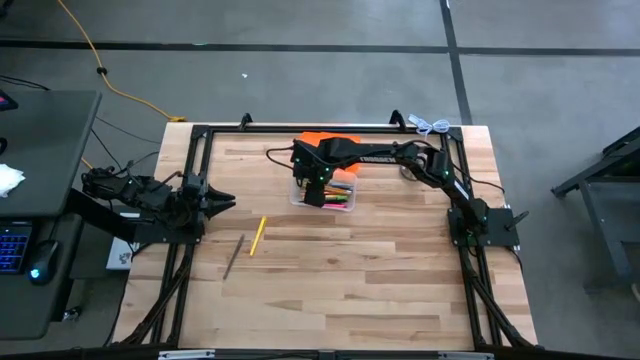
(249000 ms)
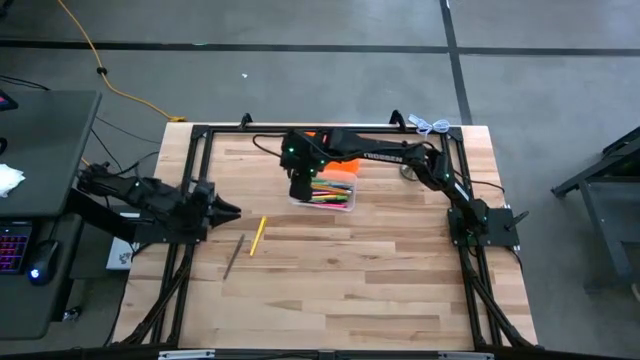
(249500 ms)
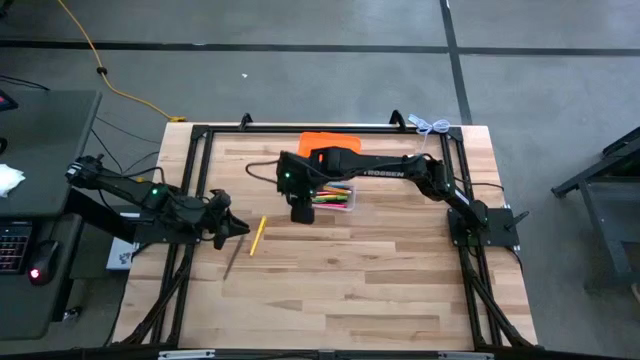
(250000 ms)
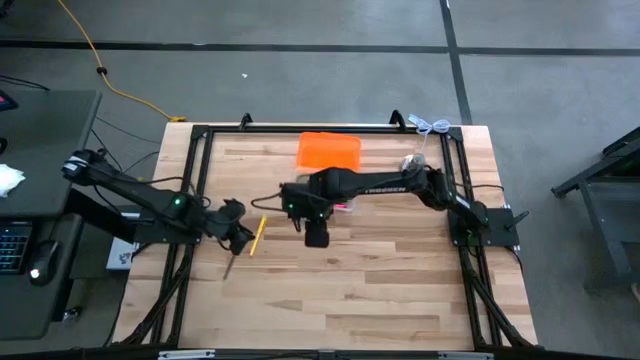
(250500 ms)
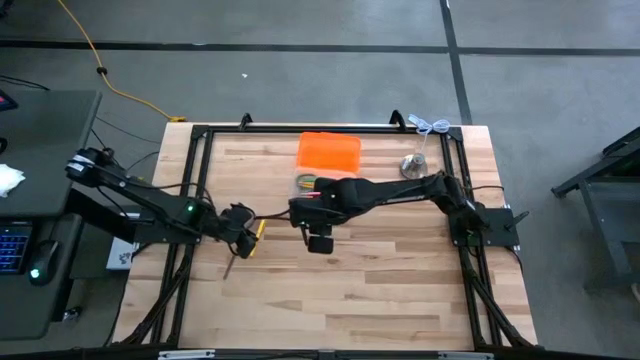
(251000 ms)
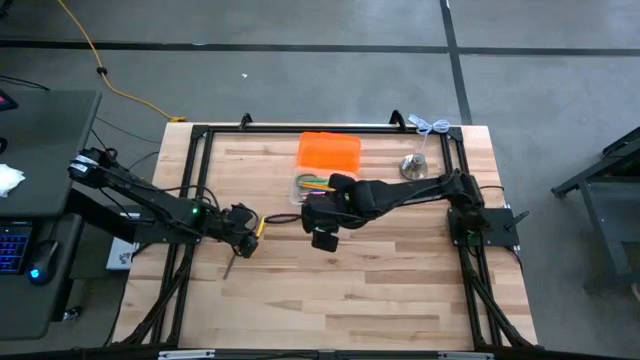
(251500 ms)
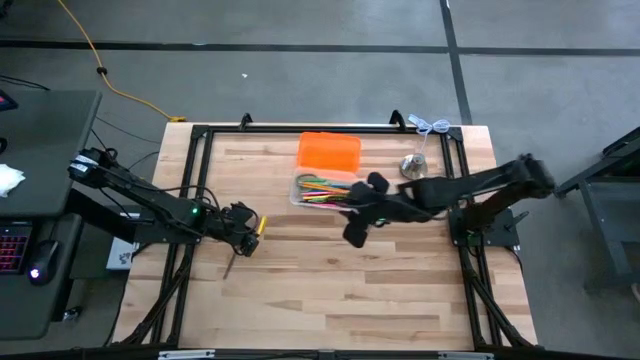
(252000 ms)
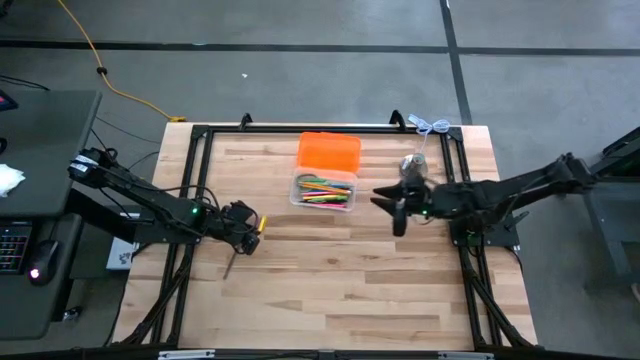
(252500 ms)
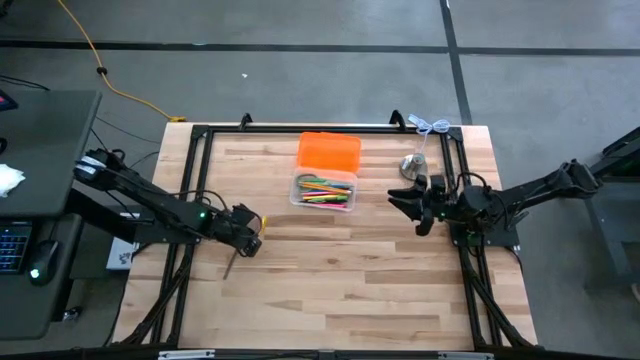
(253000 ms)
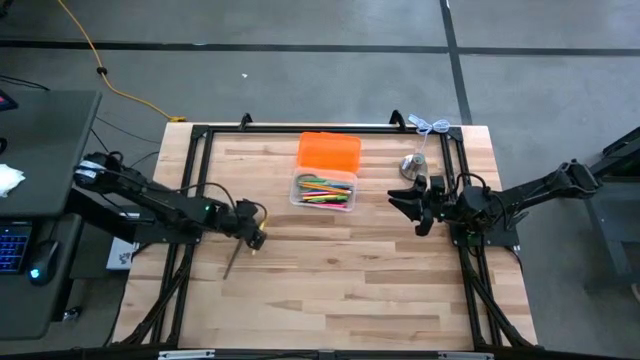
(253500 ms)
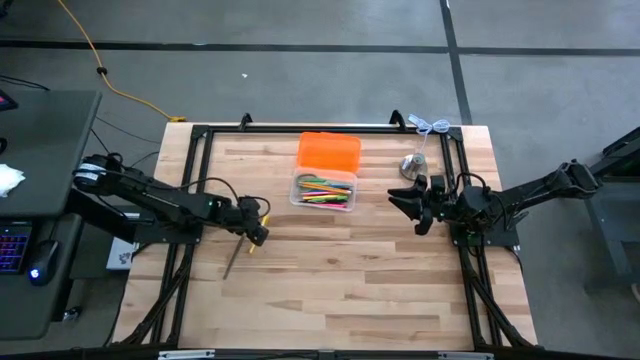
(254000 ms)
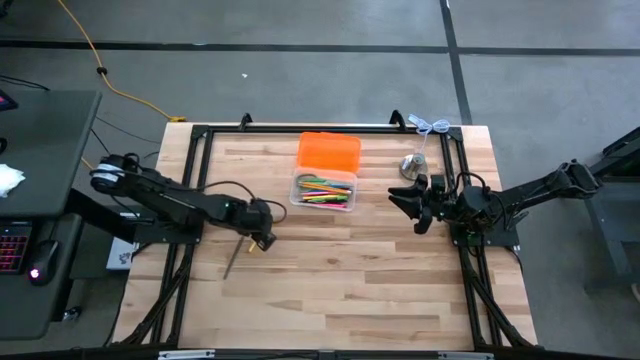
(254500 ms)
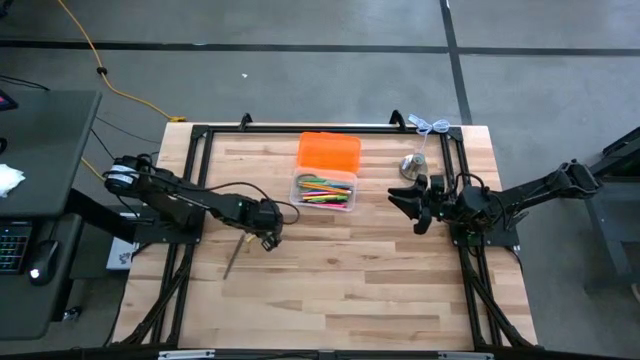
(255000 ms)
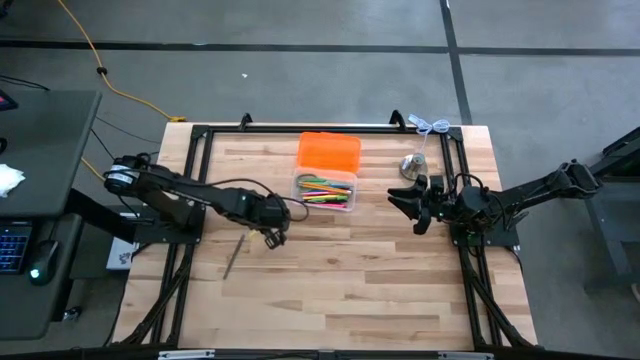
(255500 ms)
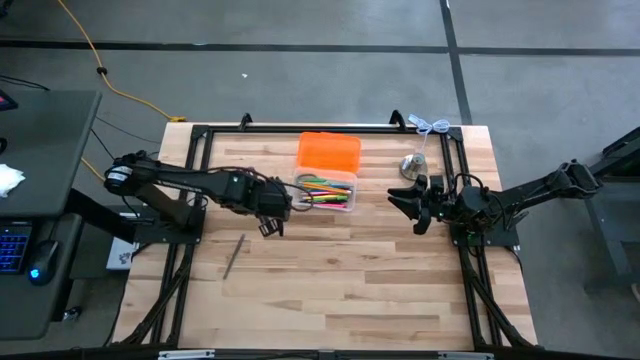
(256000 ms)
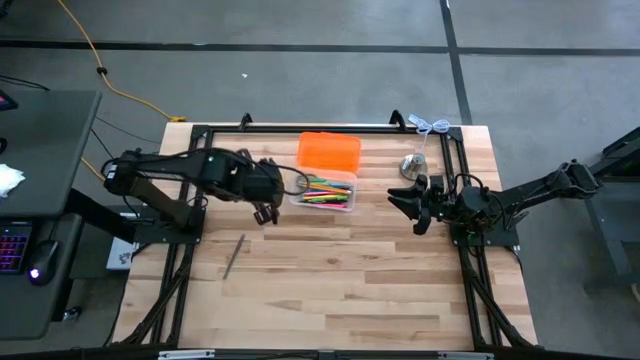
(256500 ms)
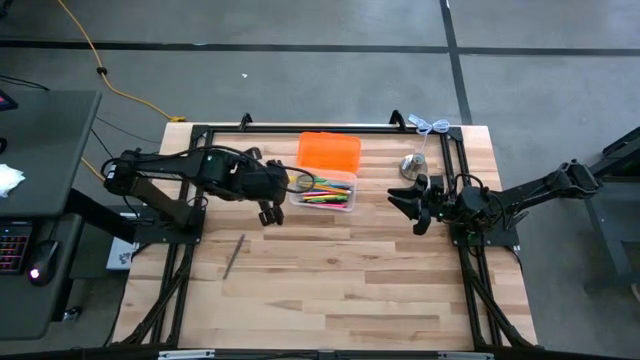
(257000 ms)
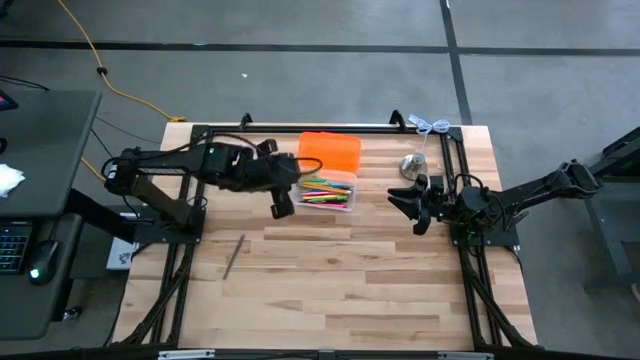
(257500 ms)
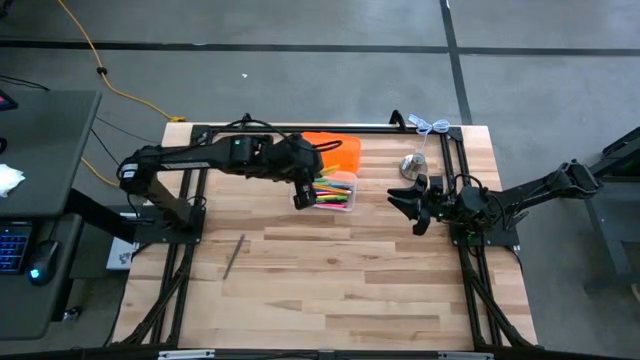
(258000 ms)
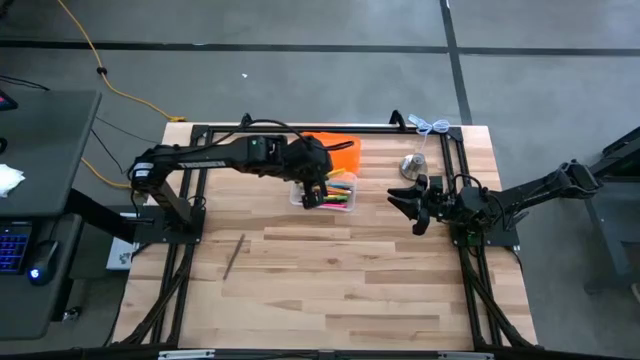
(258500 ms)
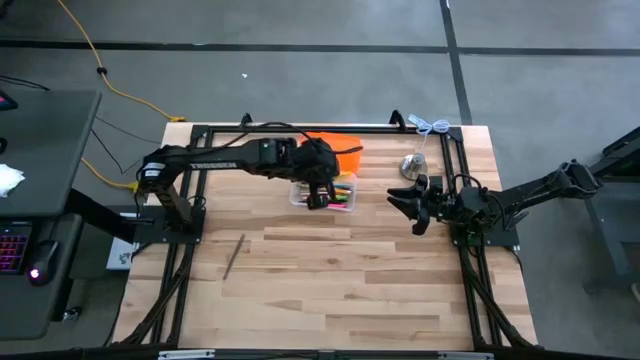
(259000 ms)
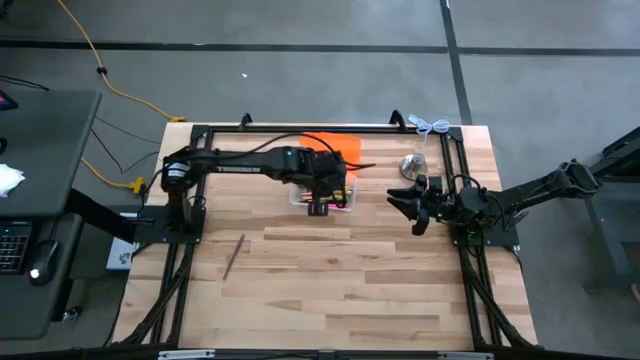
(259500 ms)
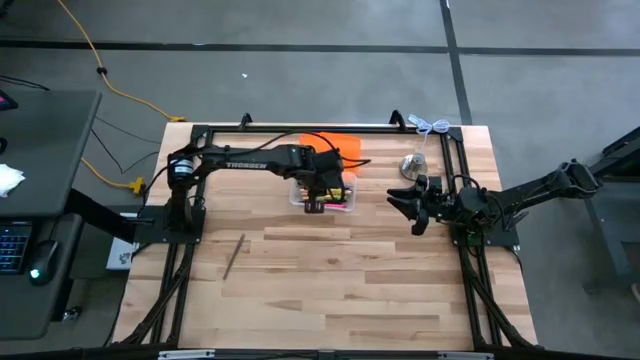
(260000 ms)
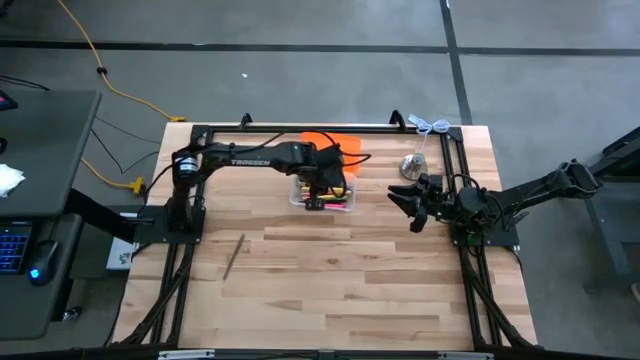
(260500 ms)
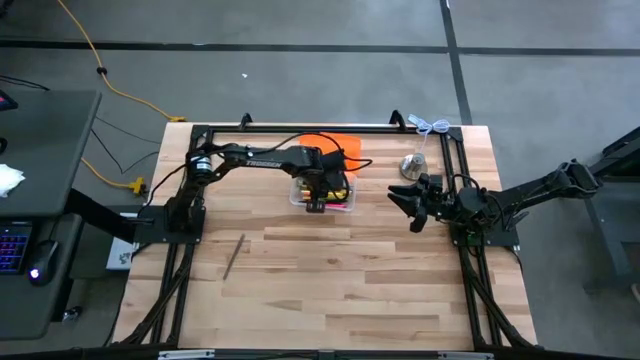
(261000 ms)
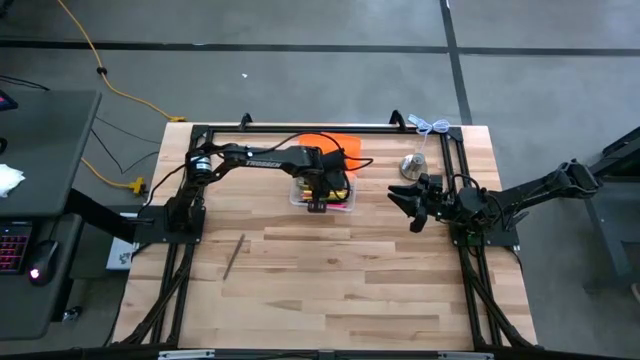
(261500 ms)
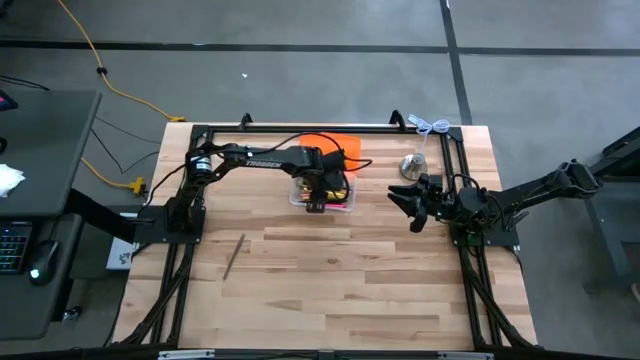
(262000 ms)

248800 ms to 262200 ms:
Task: Pick & place school supplies into a supply box
Put the yellow pen into the transparent supply box

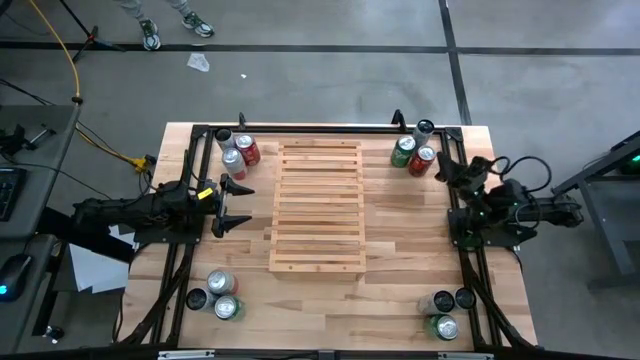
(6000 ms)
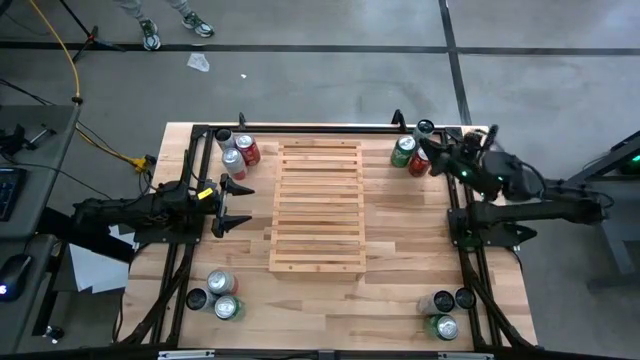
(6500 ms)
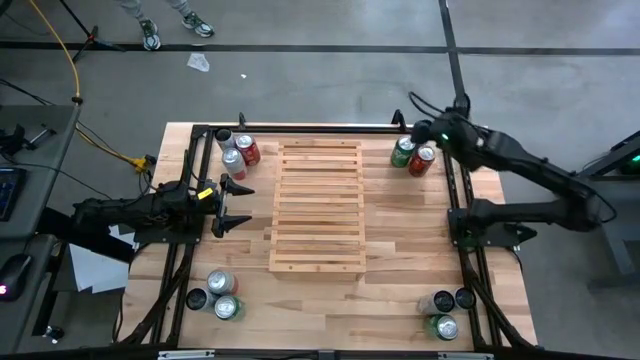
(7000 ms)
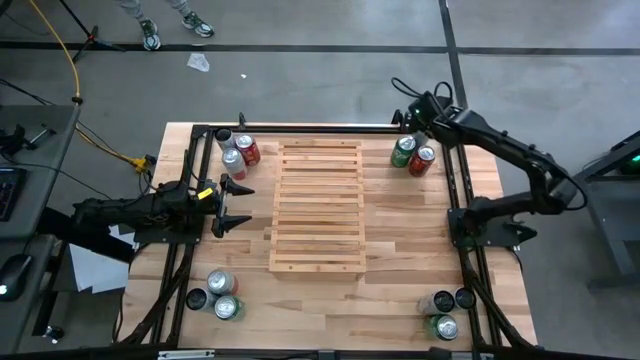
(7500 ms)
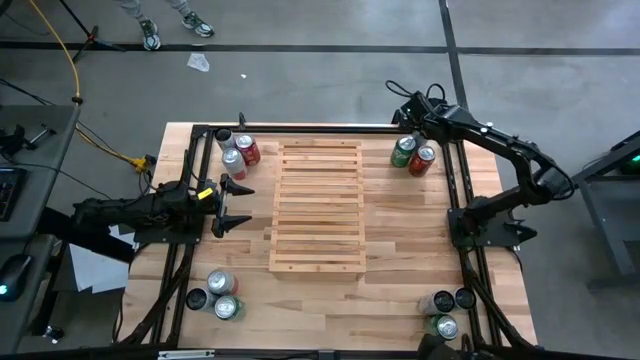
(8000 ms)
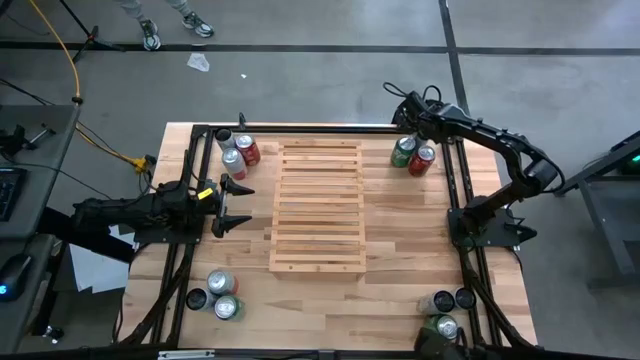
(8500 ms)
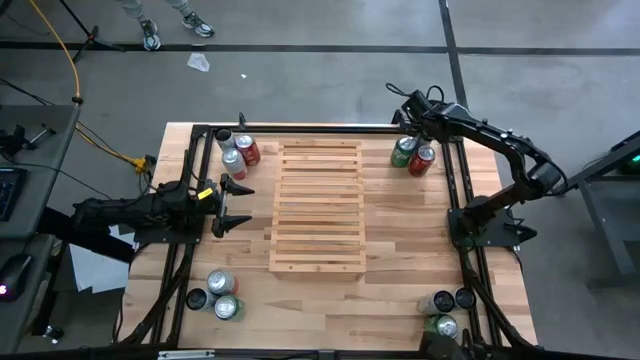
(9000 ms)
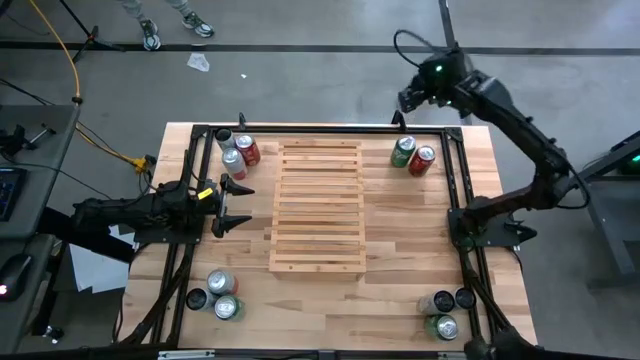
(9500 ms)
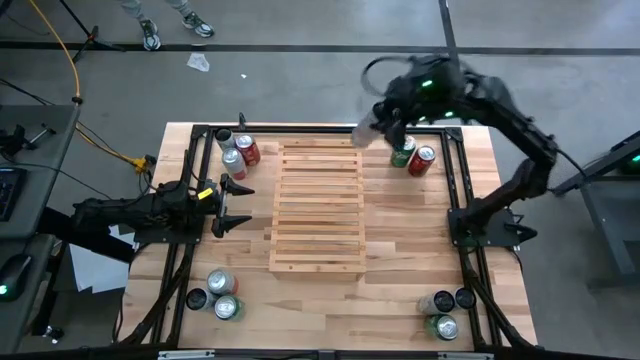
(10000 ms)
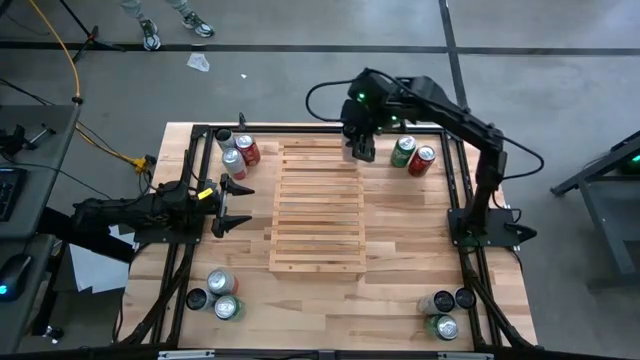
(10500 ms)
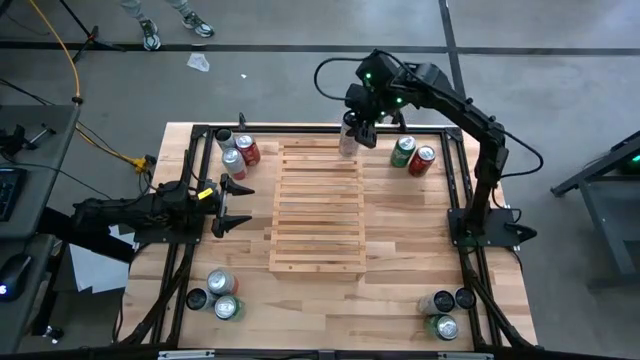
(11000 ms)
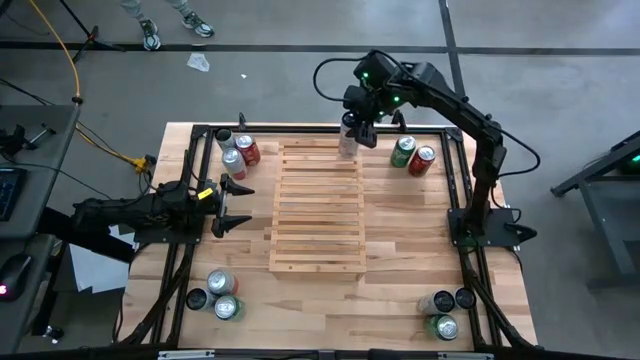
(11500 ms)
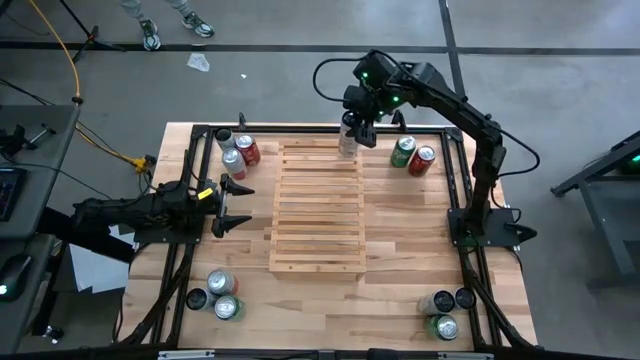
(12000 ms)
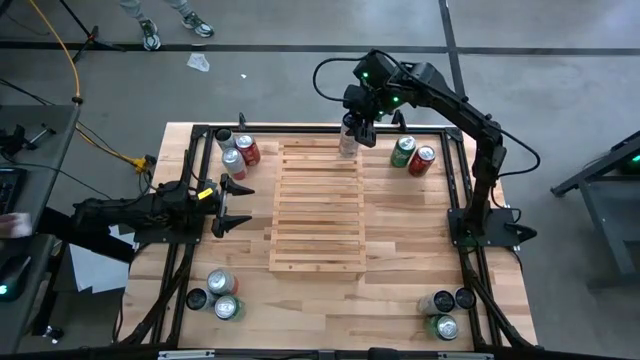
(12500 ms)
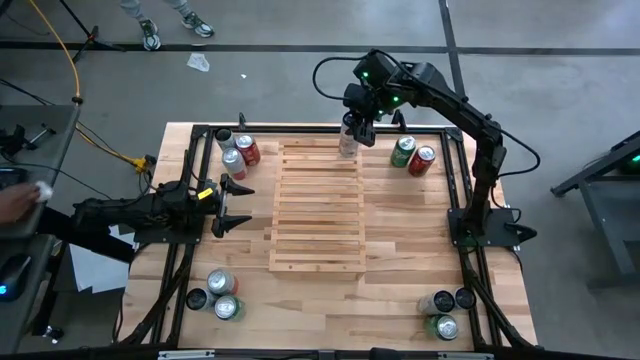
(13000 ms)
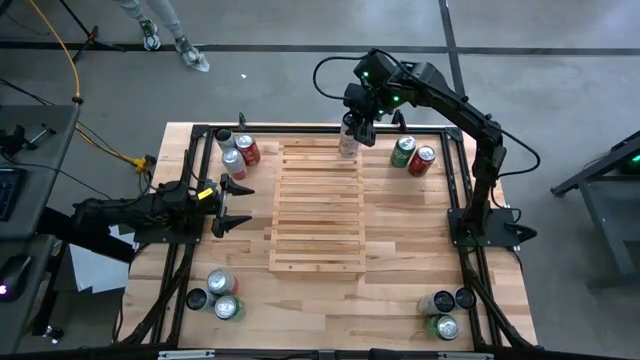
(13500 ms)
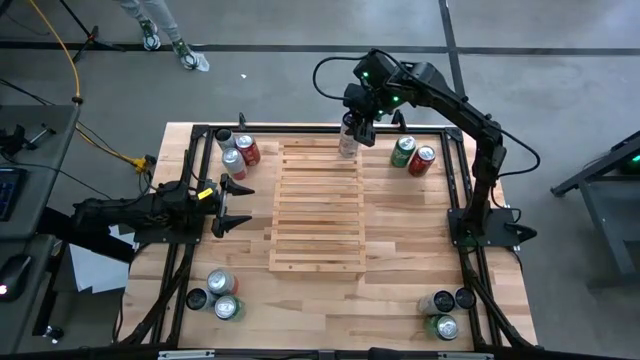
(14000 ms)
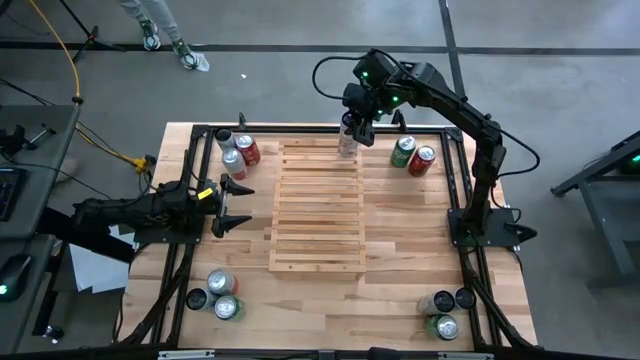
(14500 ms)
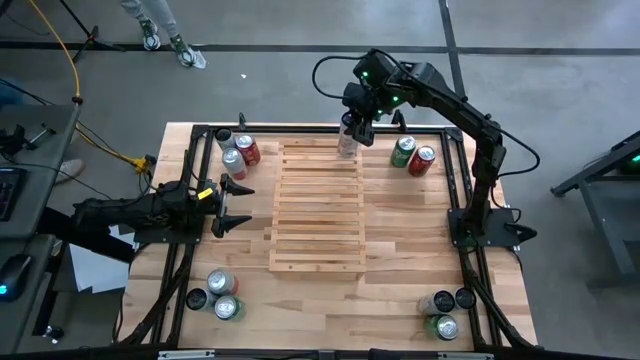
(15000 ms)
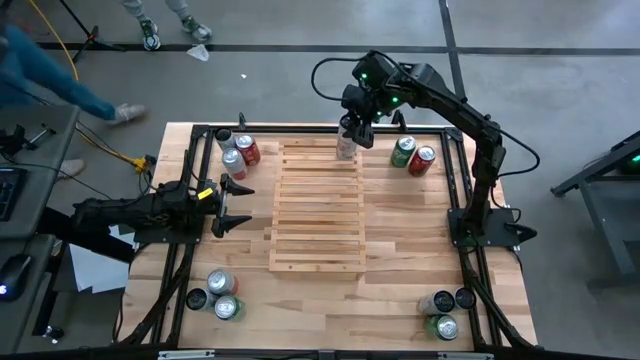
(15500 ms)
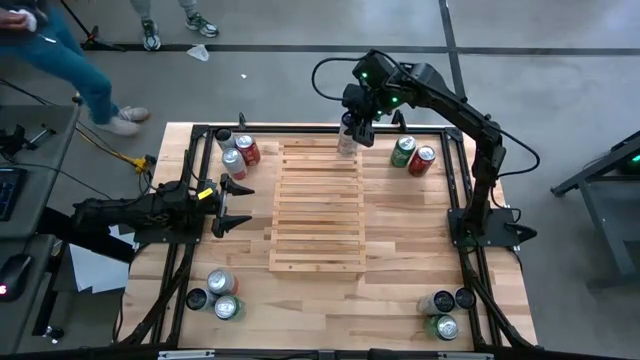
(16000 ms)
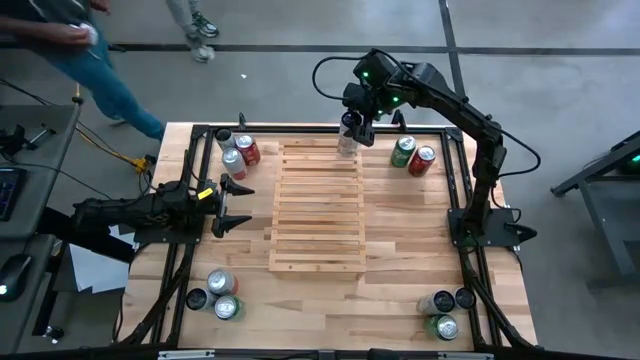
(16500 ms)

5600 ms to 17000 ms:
Task: Place canned beverage on shelf
Put the white pink soda can on the shelf
